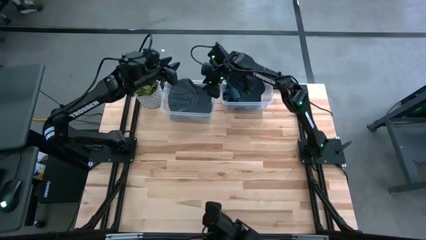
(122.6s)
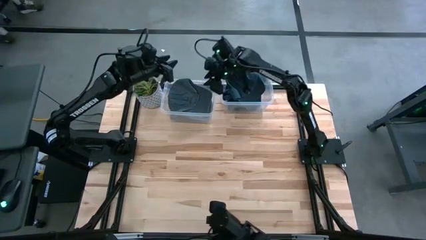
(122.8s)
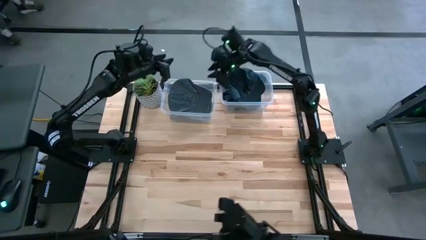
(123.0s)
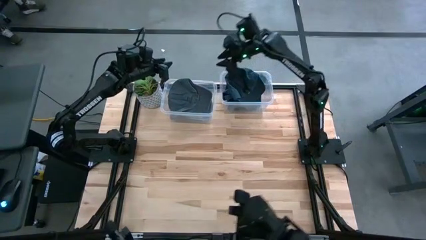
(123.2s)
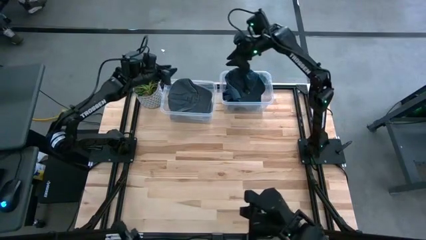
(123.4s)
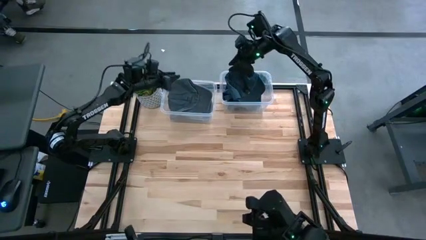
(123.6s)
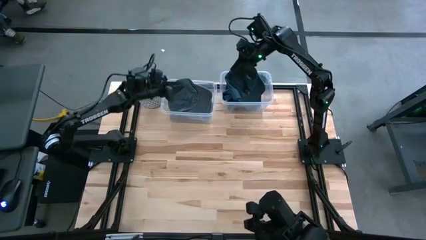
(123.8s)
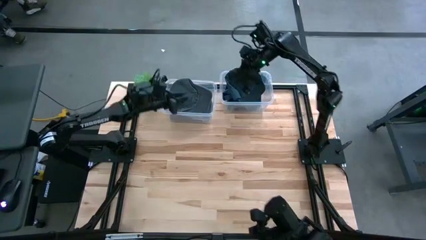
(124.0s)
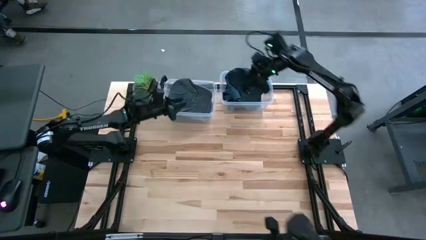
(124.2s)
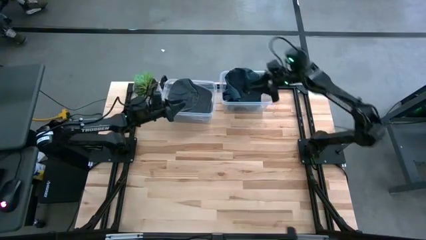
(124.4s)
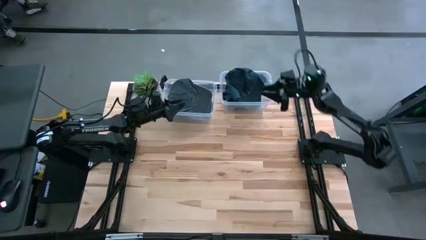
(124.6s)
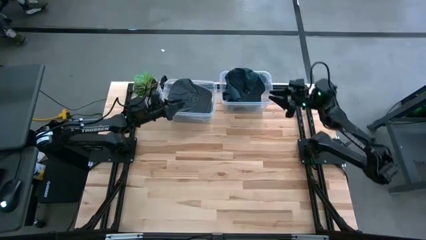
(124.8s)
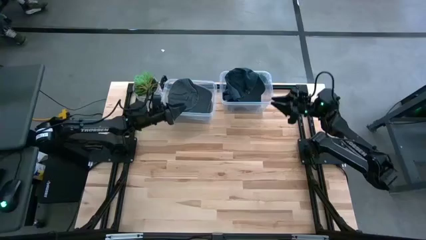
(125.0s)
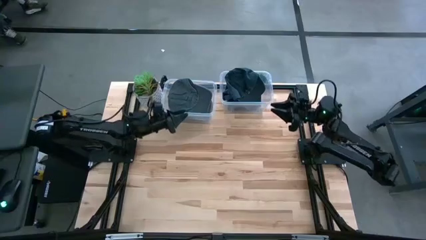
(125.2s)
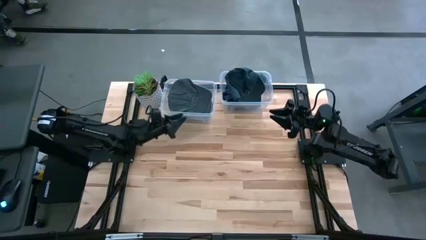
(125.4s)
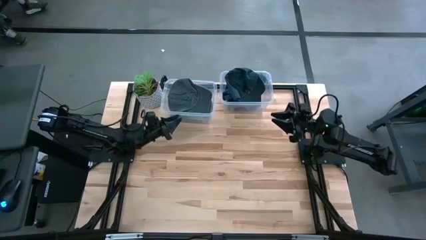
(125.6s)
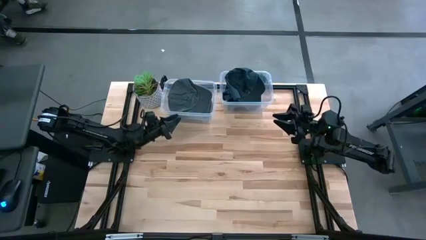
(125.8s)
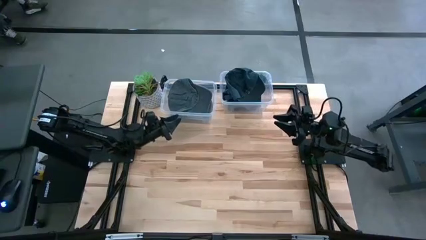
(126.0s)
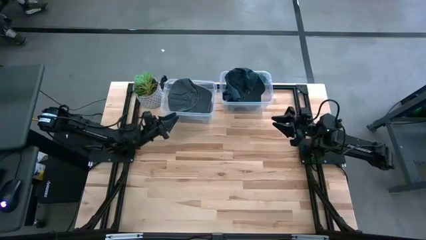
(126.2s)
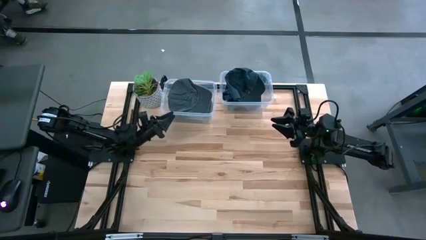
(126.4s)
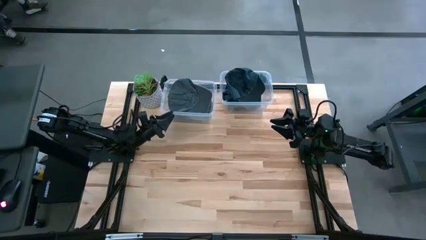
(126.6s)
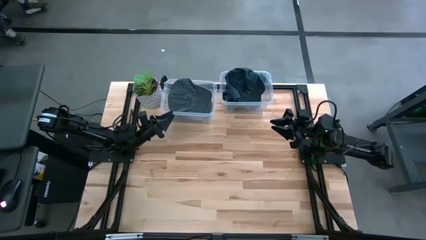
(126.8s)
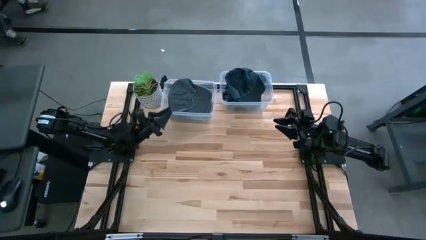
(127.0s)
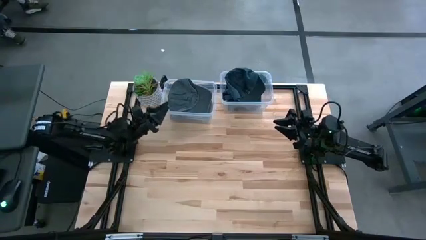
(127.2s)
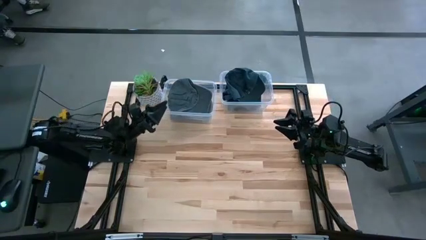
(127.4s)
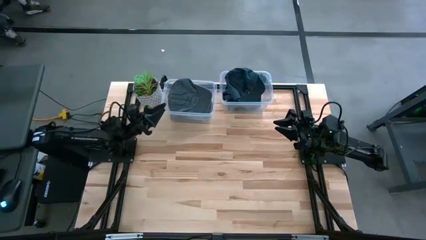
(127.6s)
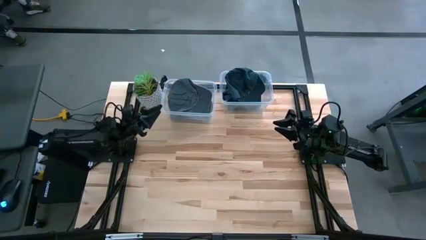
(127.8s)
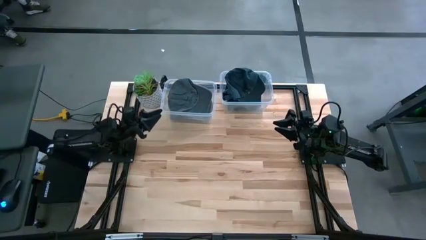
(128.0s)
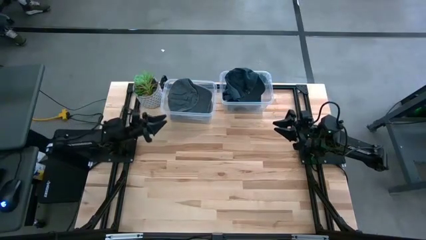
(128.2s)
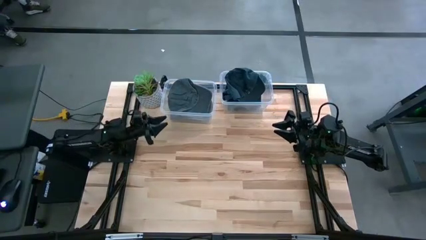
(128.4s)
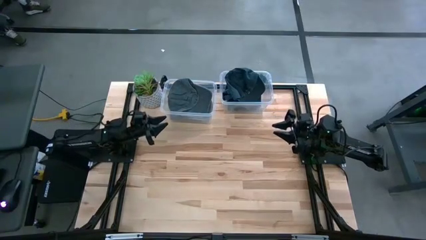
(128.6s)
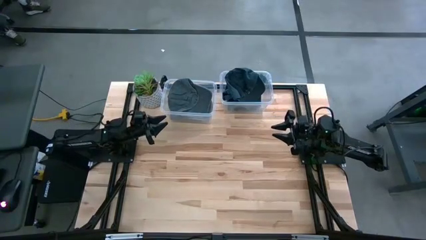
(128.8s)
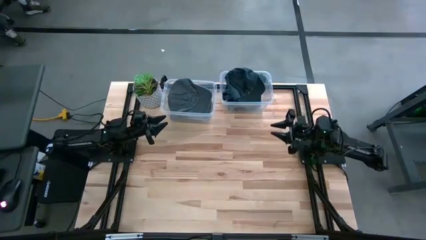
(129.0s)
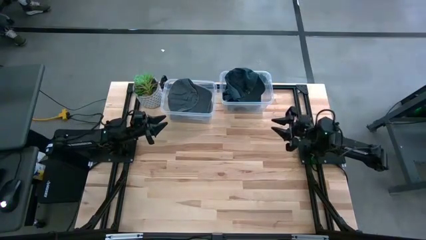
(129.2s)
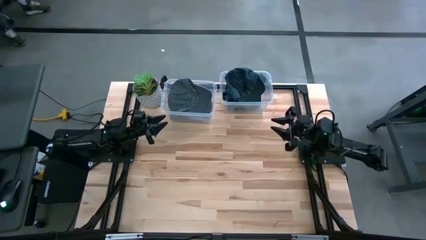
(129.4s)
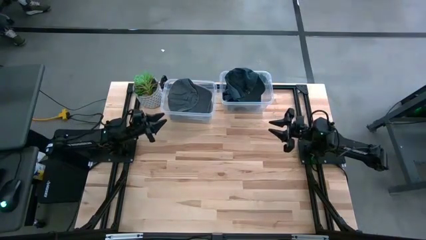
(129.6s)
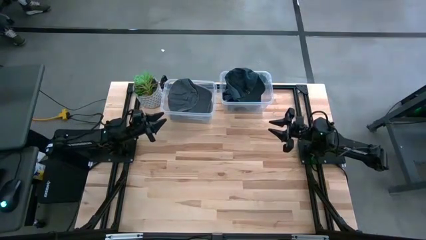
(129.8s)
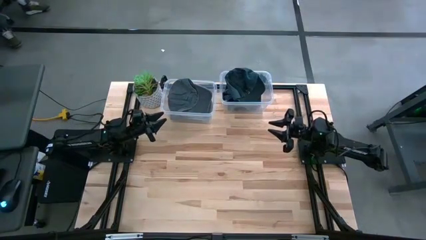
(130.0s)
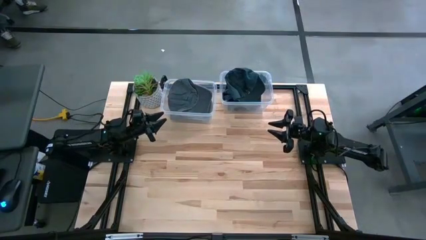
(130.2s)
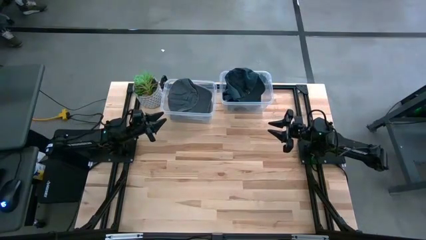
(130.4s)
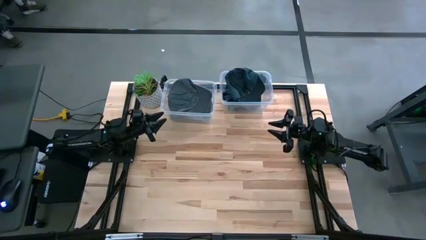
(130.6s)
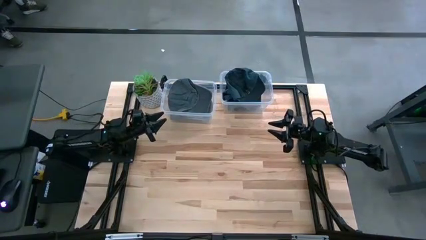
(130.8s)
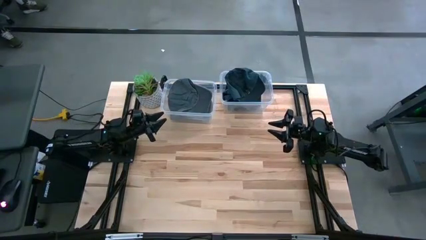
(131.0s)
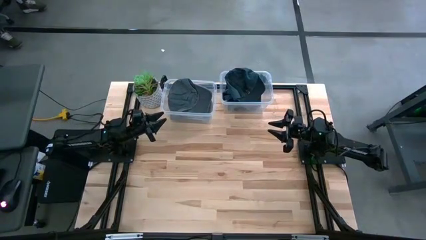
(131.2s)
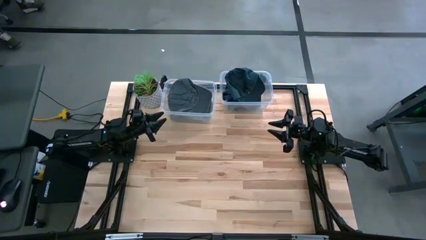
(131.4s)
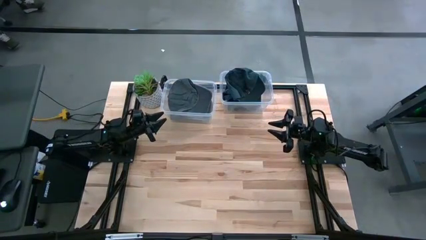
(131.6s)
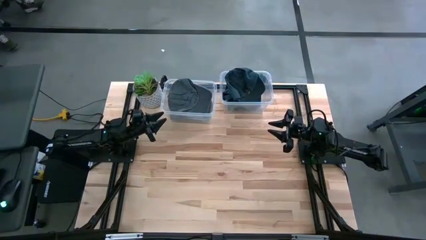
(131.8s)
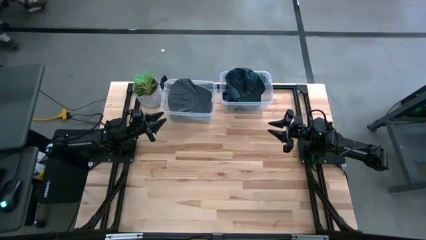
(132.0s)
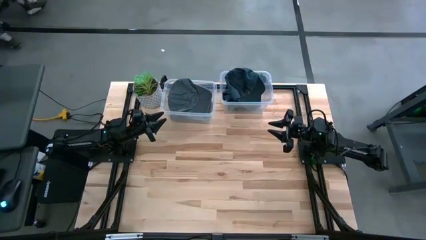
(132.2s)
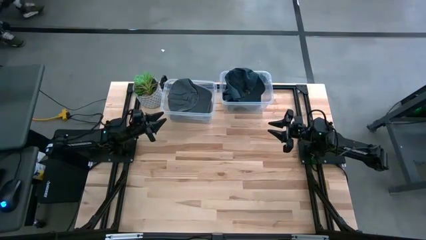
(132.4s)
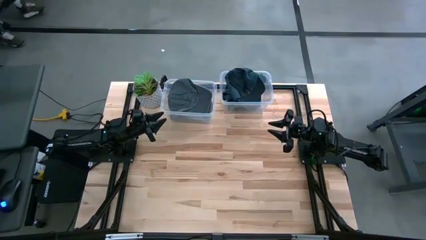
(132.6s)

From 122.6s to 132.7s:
Task: Pick & Place hat
Return to Home Position

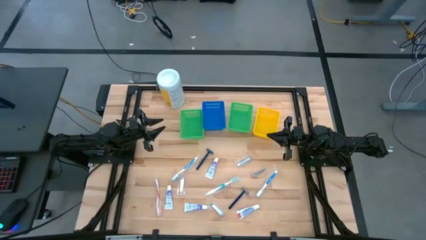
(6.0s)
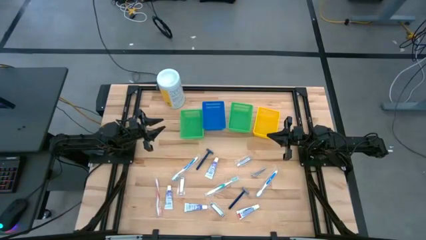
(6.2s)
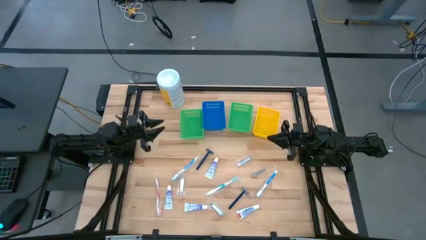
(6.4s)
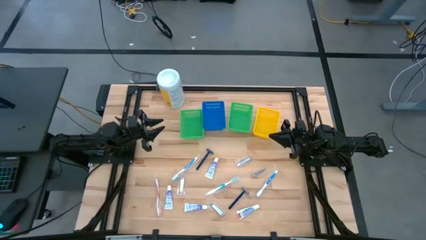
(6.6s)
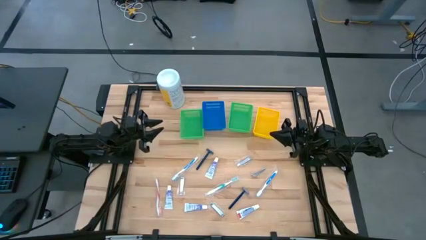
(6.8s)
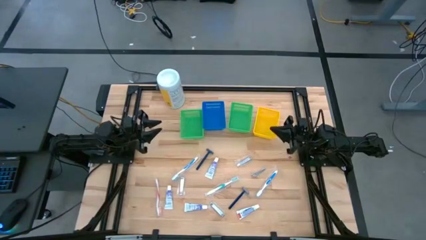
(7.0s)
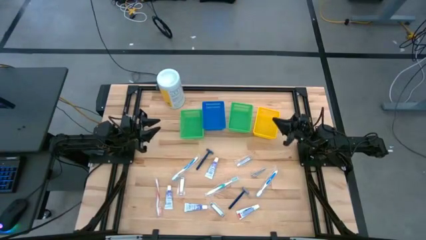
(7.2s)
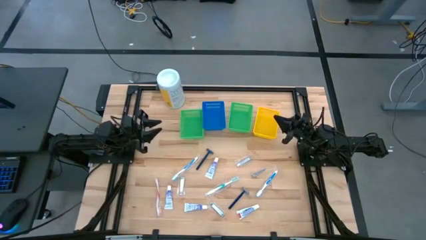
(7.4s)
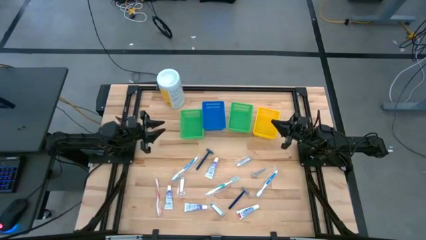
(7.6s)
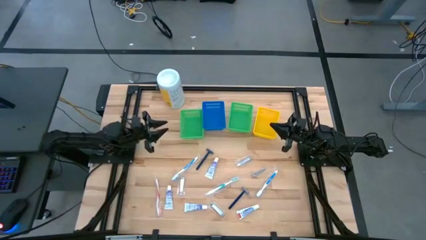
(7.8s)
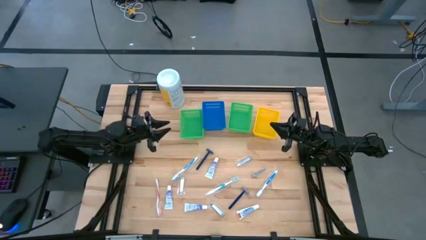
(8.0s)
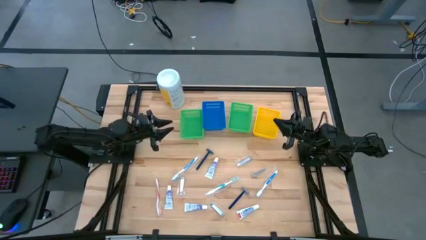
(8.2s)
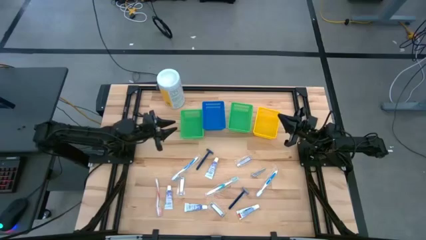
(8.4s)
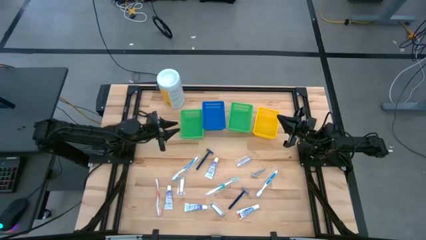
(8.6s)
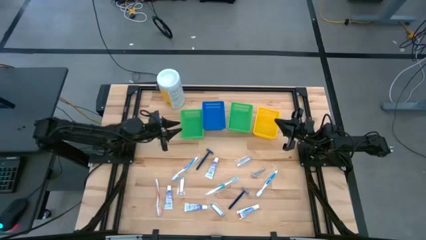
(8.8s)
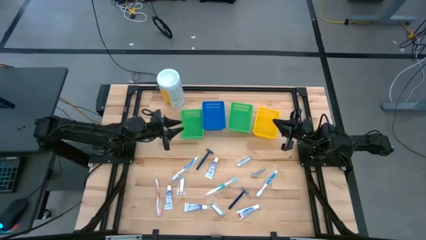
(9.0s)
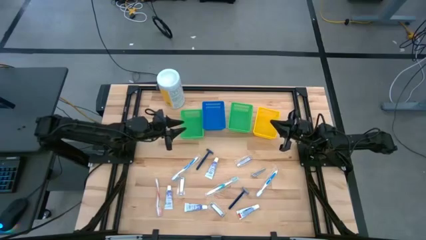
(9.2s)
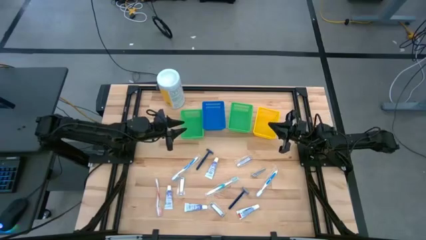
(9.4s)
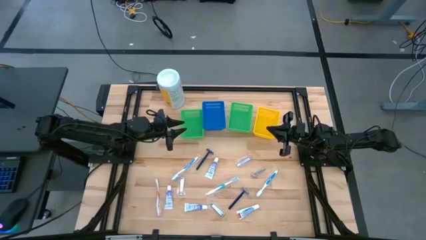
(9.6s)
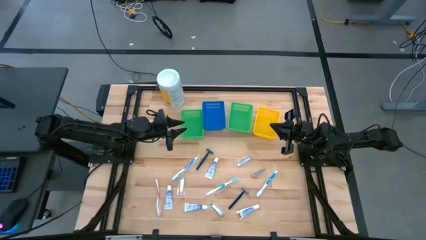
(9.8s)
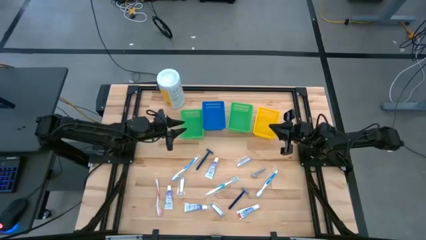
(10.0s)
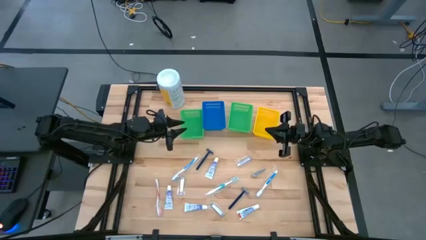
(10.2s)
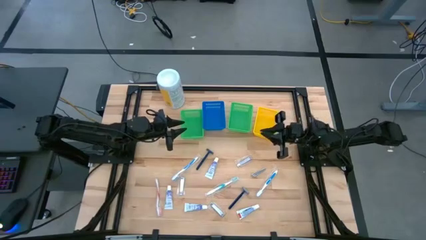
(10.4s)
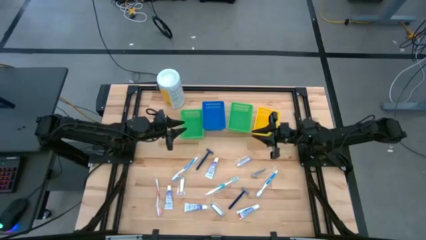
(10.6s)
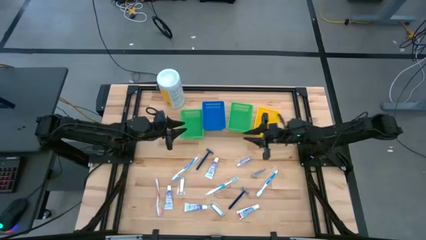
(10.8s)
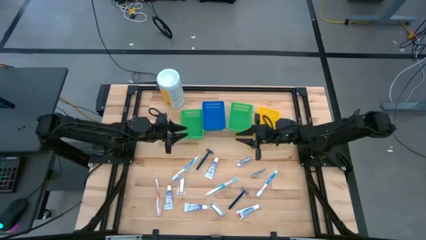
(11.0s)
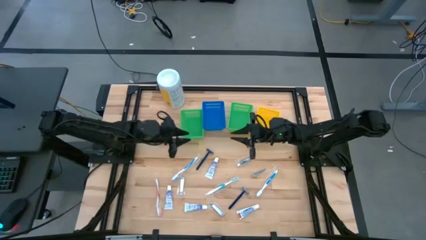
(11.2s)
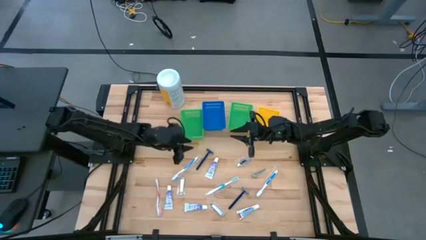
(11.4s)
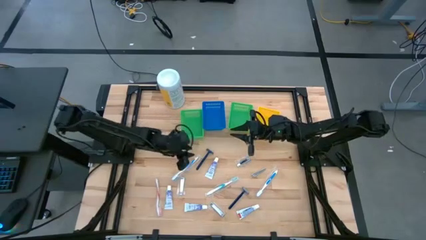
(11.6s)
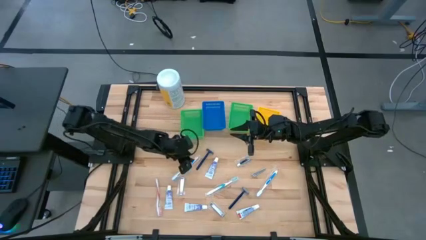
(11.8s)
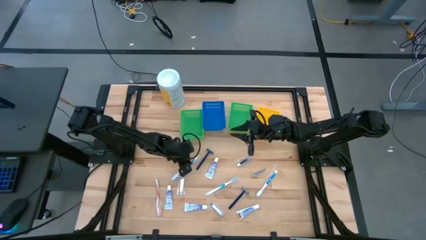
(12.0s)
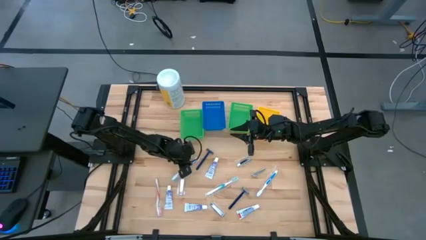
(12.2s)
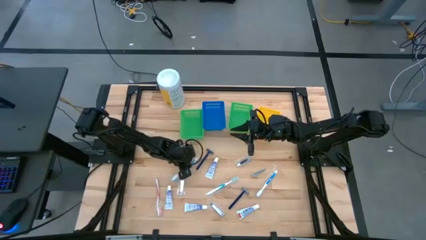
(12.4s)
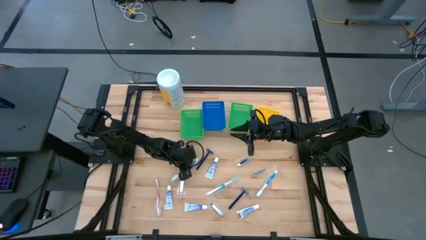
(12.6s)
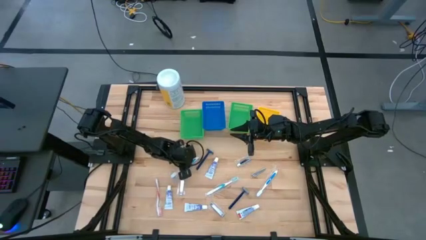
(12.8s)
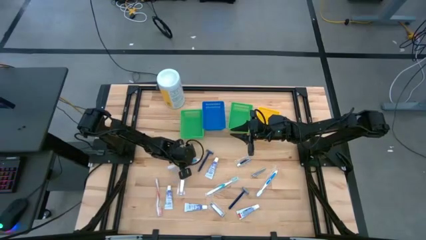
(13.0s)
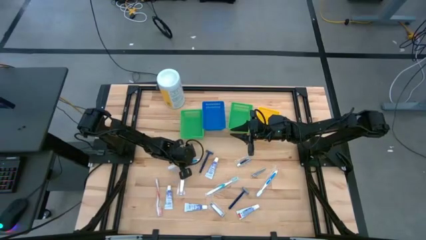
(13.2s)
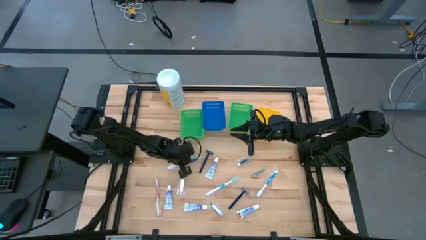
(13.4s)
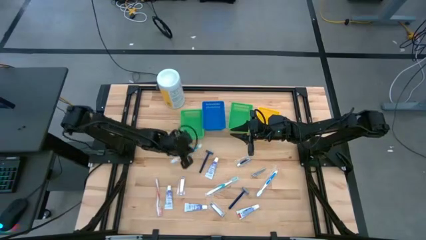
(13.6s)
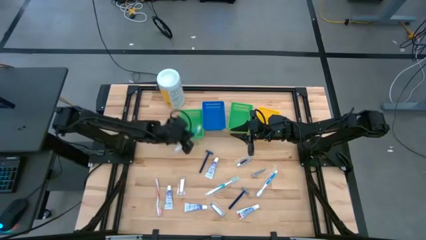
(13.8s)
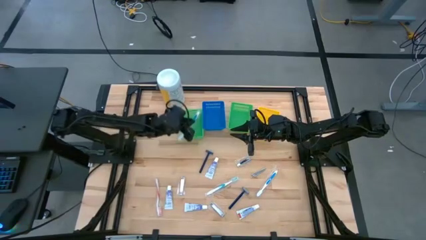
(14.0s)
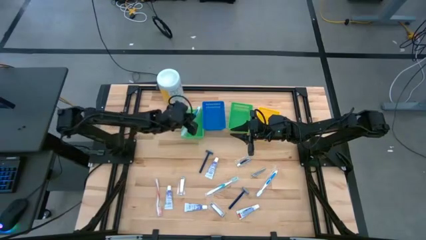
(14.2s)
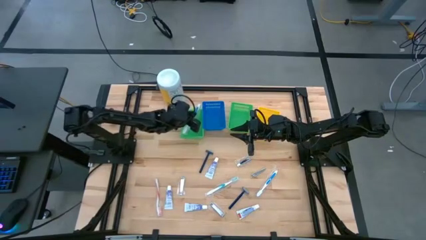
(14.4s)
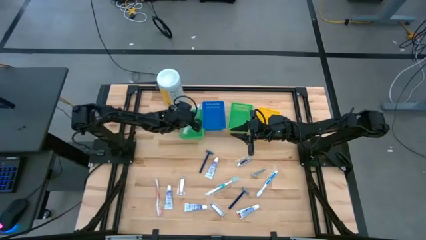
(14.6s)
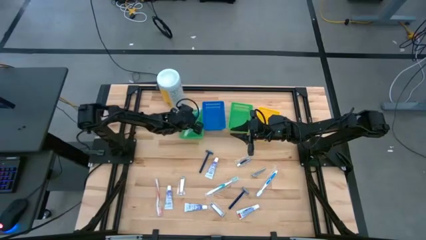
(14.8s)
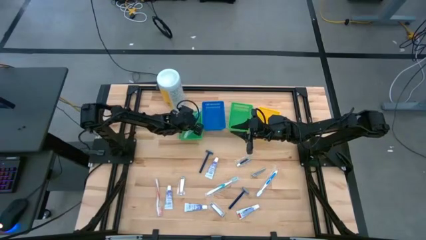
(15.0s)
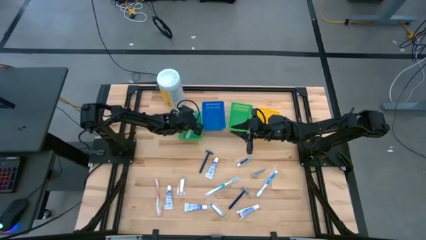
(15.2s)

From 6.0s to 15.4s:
Task: Pick & Place Travel size toiletries
Put the blue toothbrush into the left green basket
